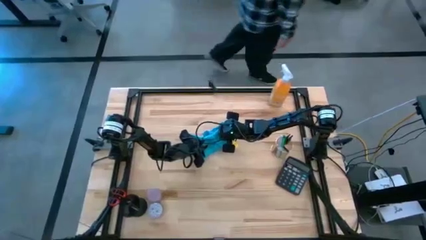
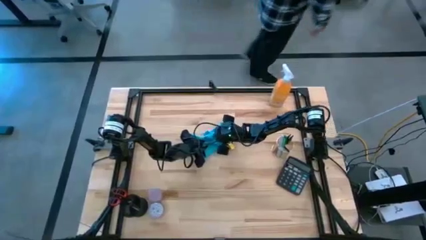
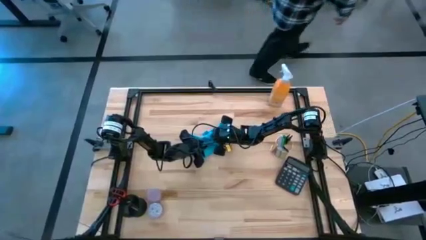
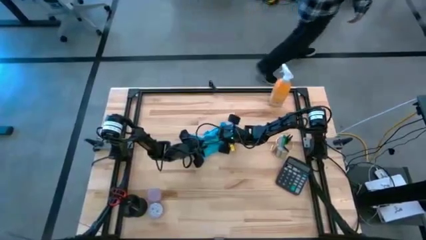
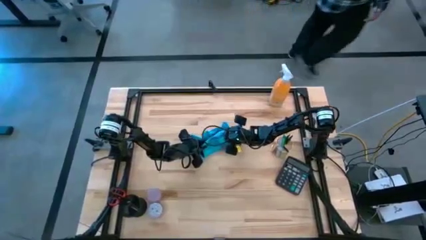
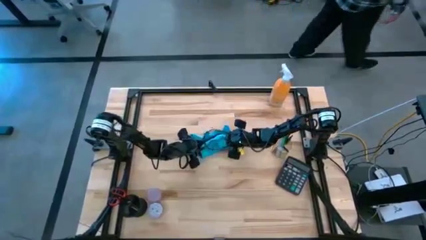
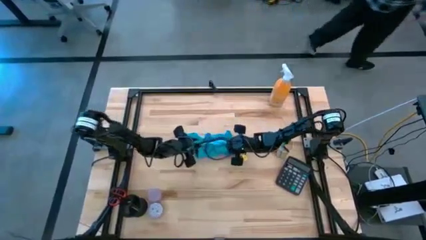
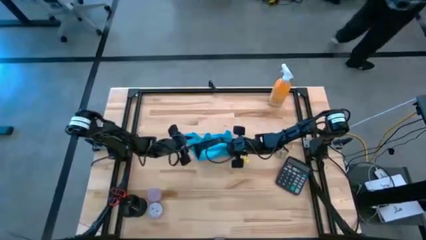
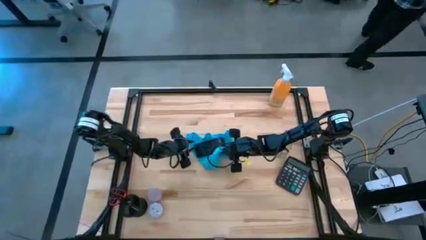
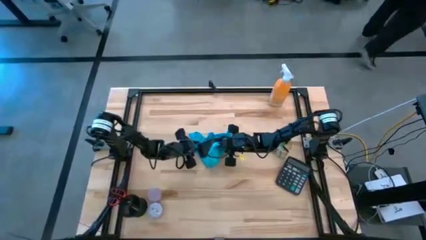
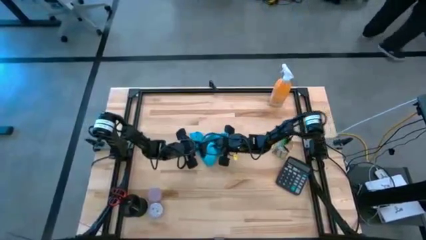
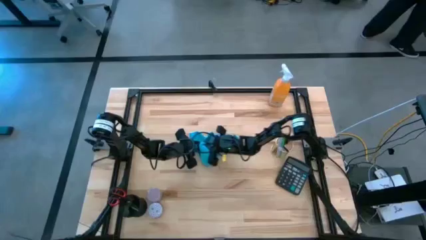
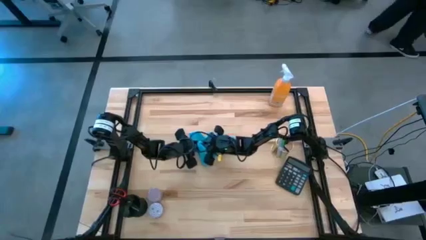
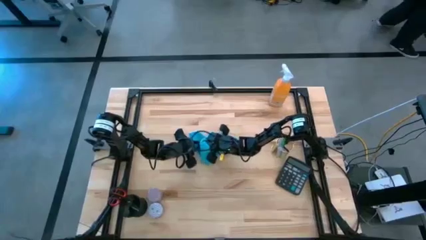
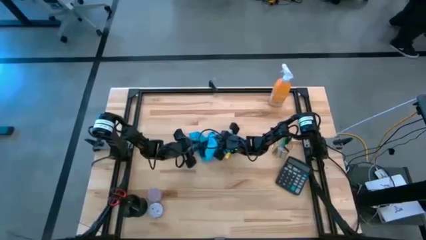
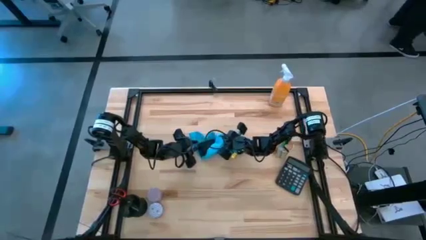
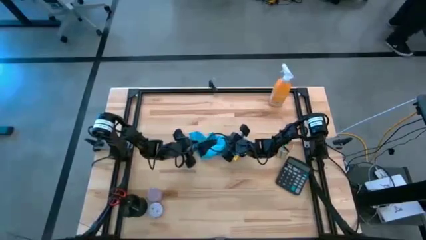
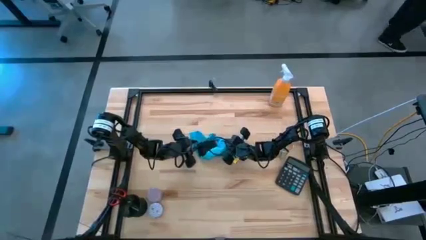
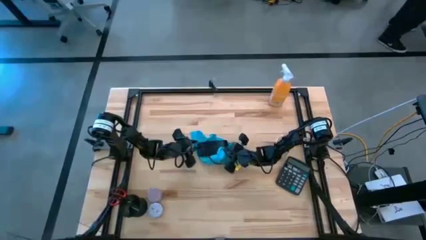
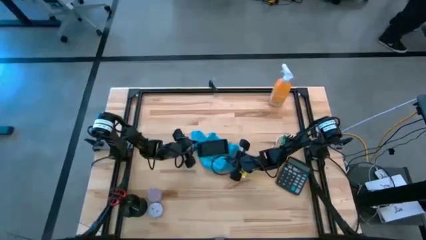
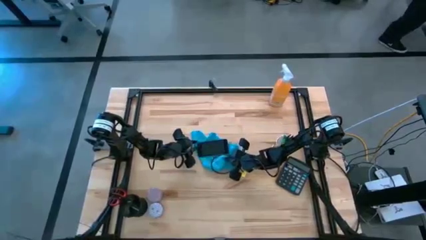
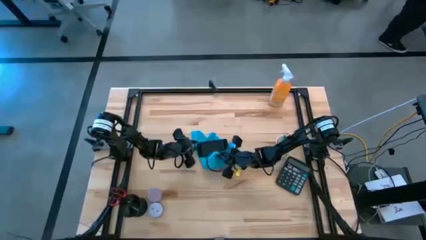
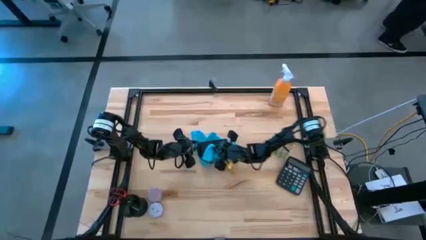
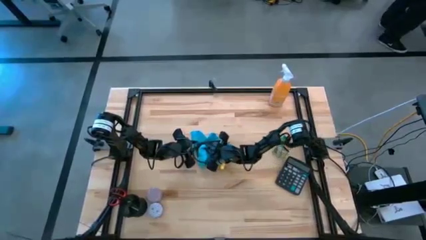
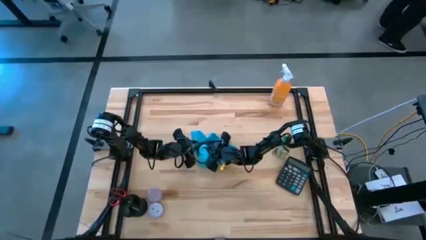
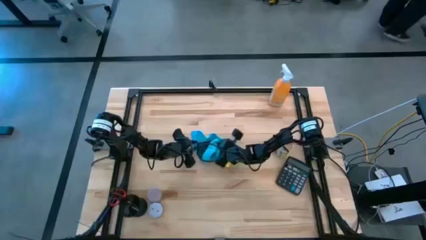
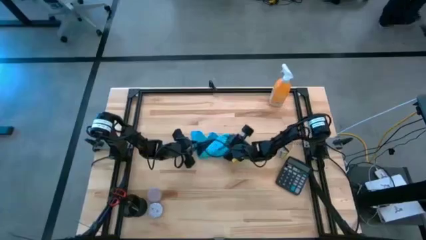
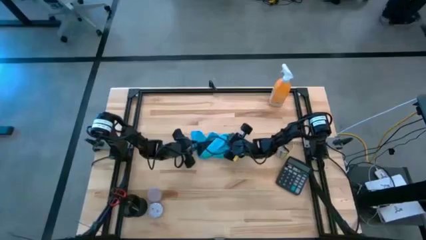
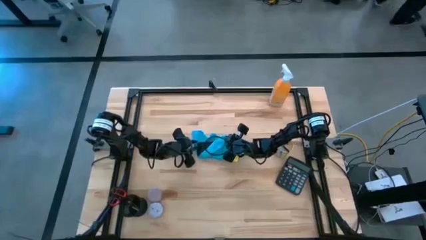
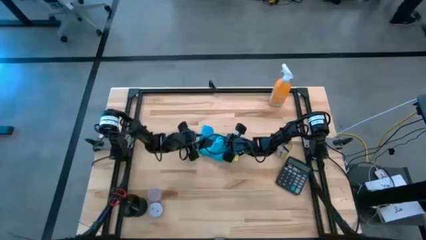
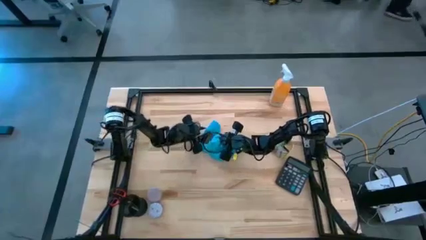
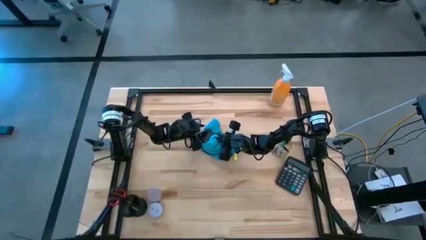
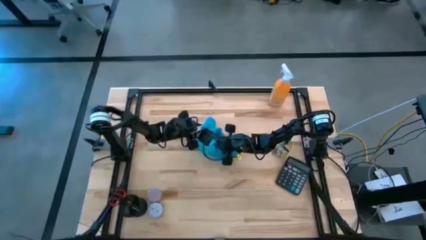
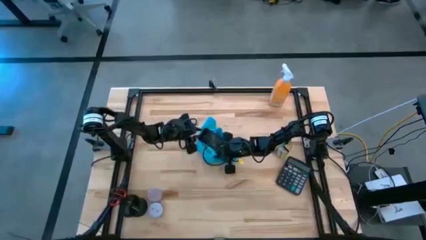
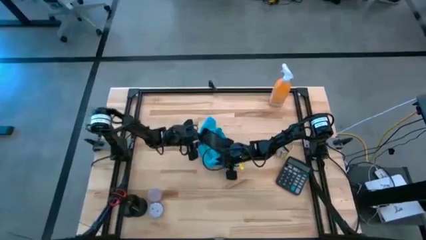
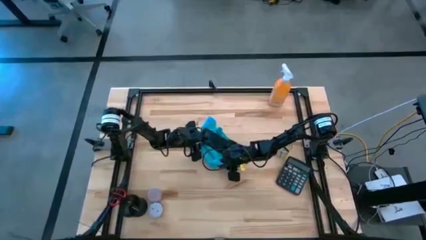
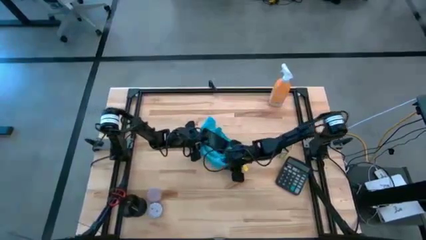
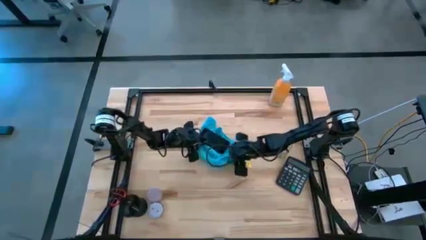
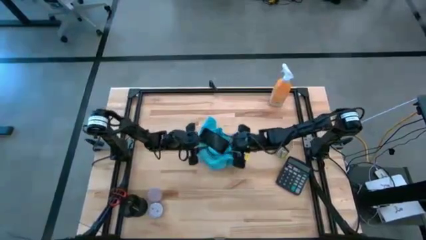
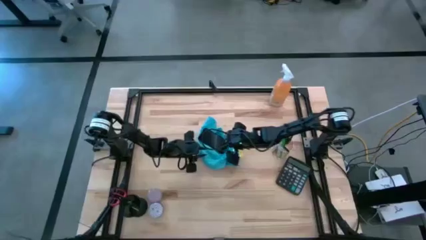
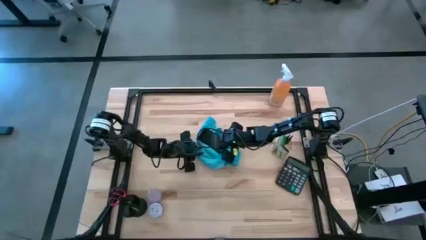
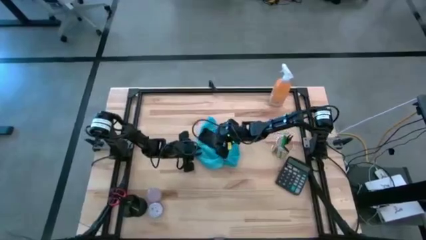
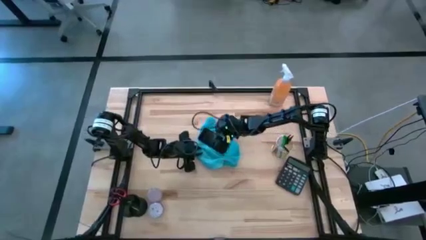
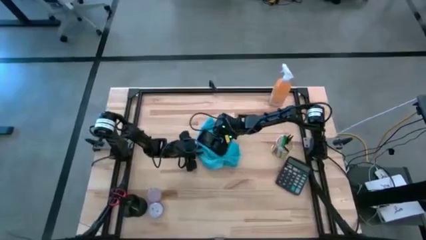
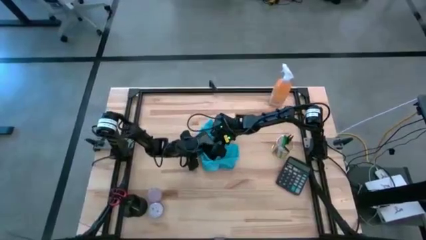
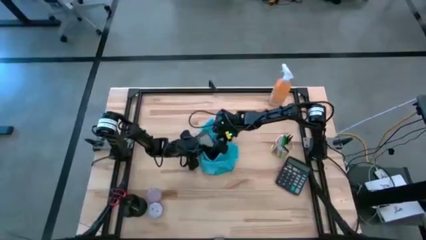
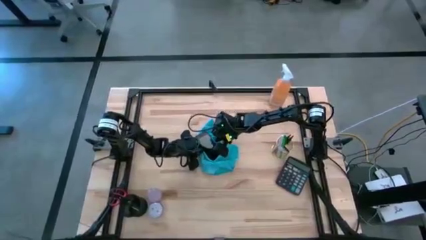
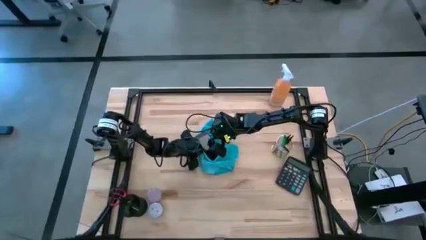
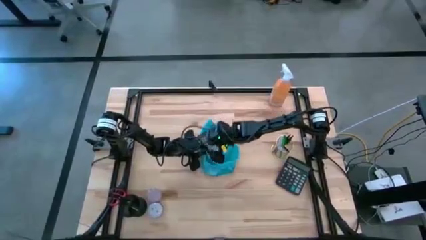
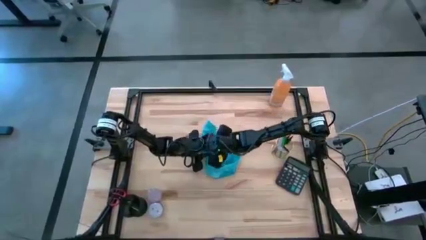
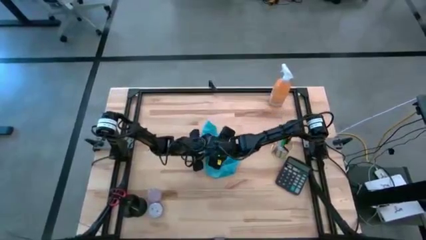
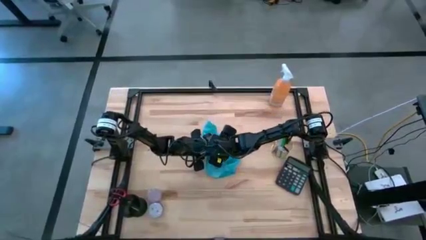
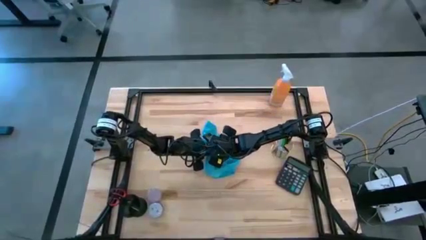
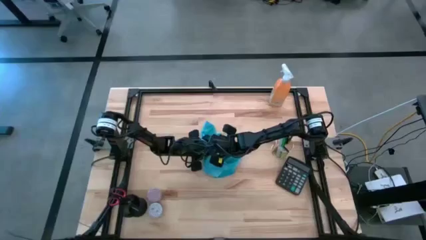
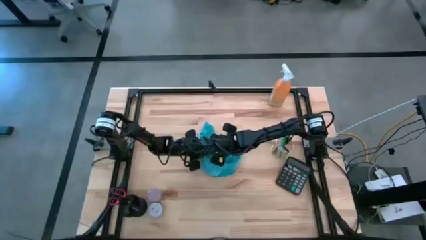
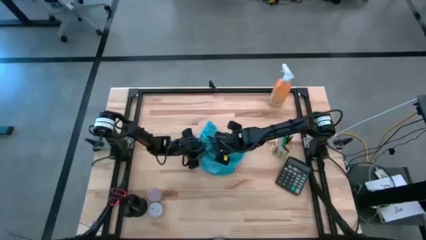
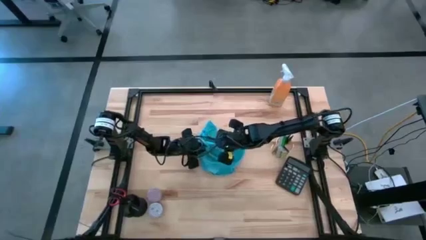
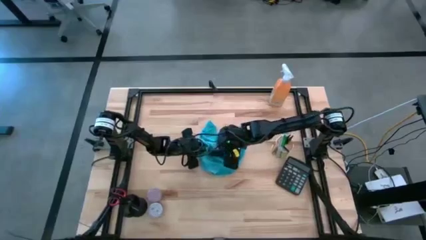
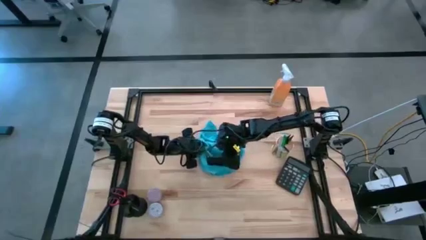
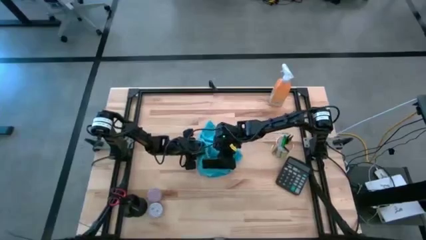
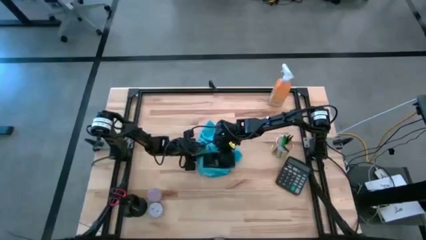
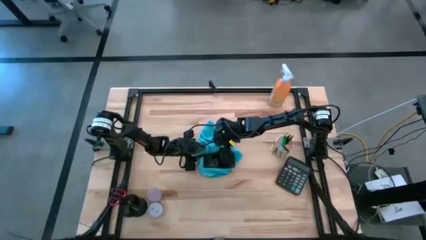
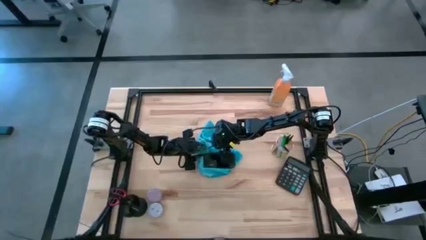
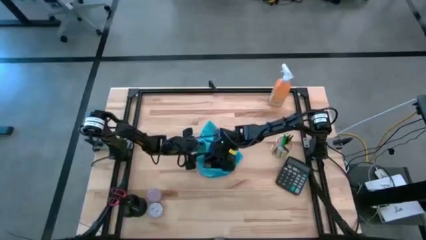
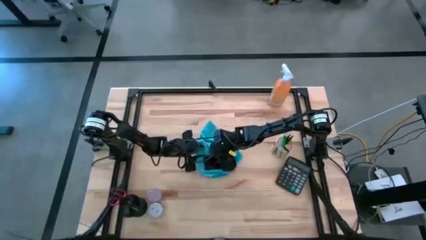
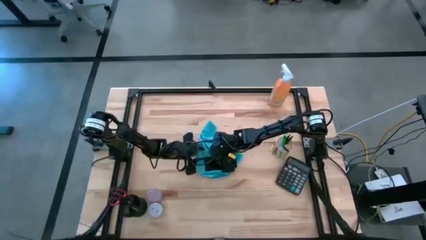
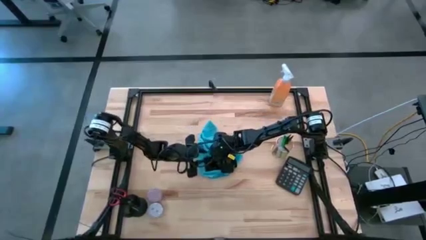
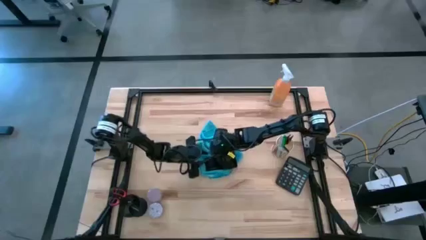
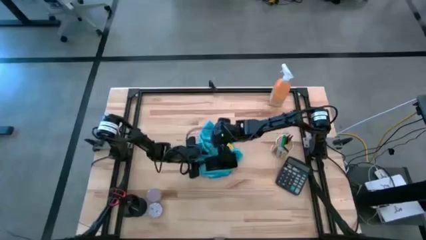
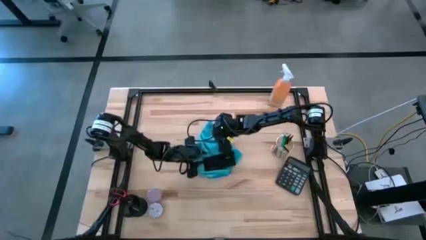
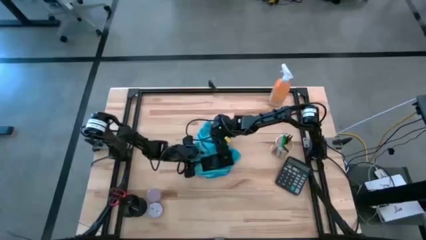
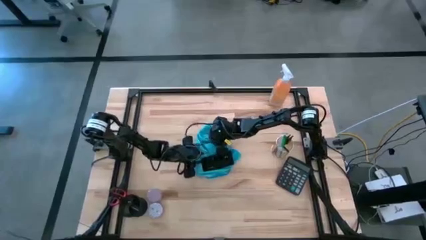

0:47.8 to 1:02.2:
Task: Apply microfiber cloth
Wipe the front and back of the black cellphone using the blue microfiber cloth
